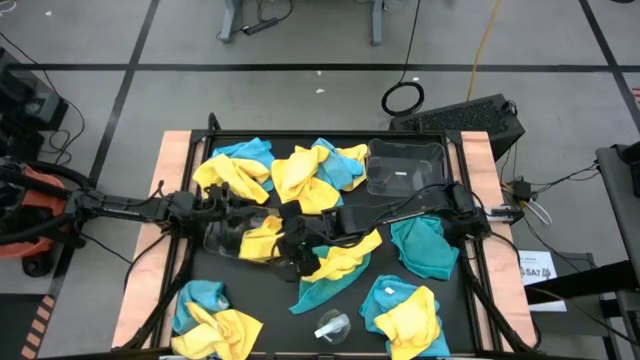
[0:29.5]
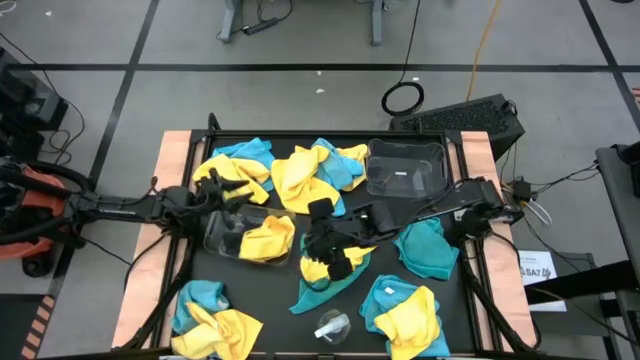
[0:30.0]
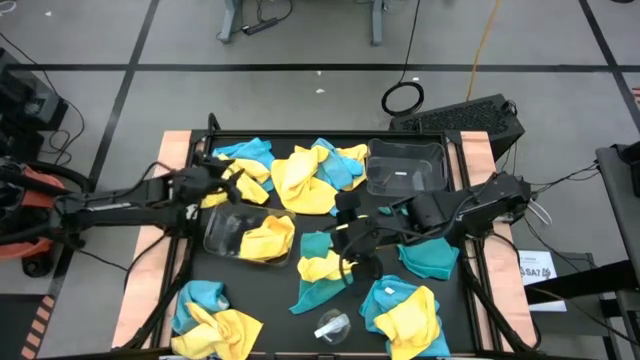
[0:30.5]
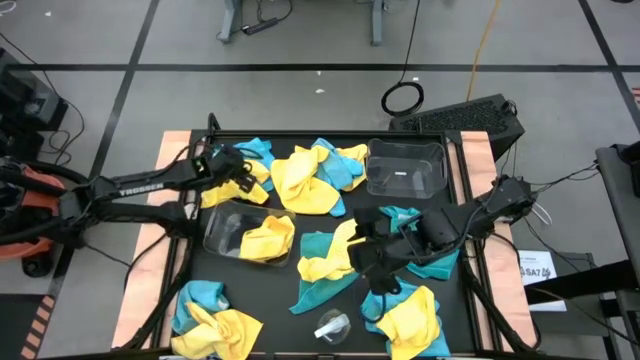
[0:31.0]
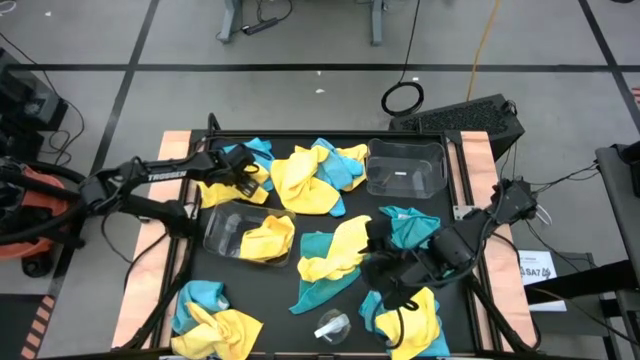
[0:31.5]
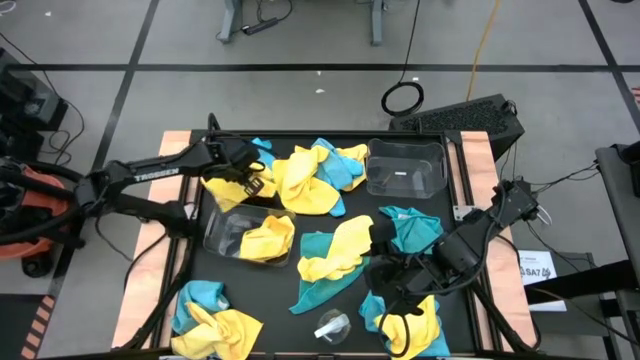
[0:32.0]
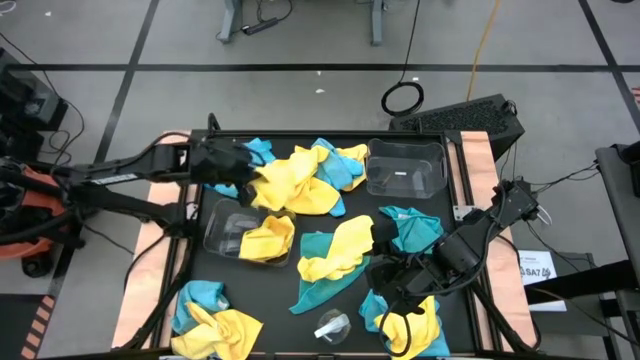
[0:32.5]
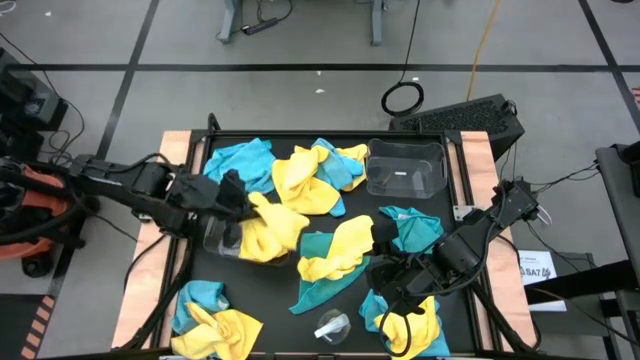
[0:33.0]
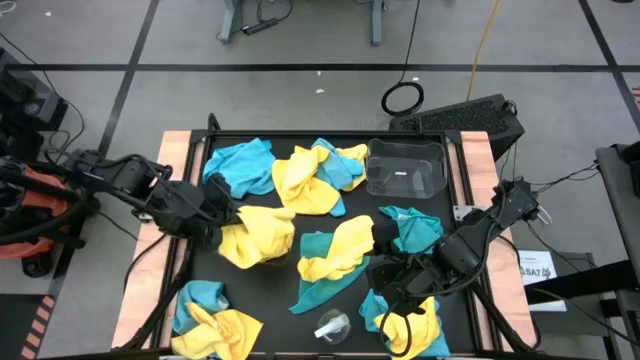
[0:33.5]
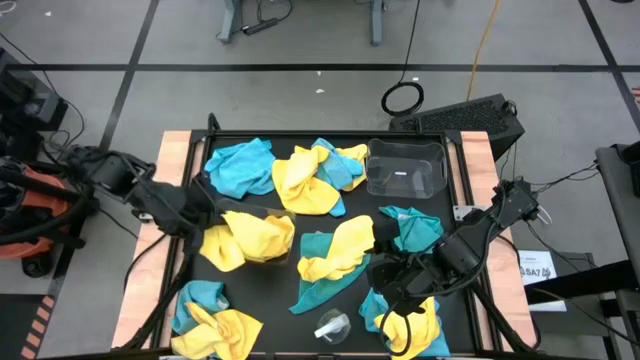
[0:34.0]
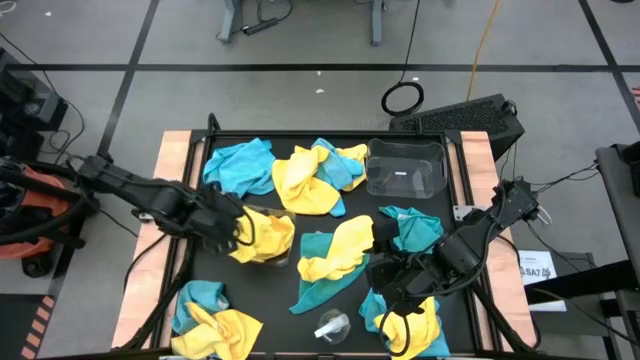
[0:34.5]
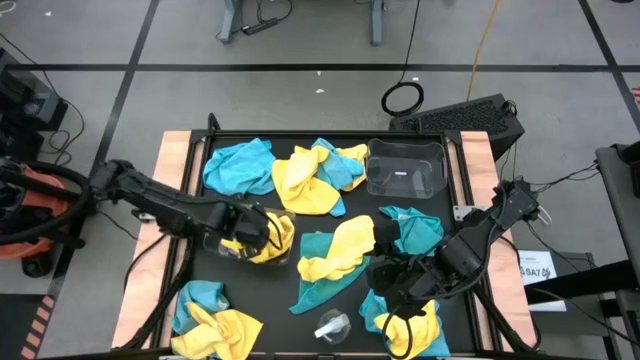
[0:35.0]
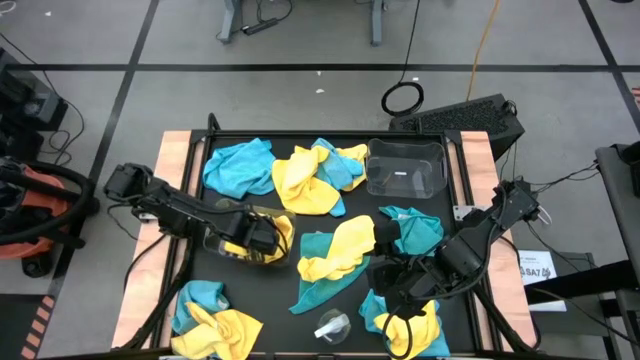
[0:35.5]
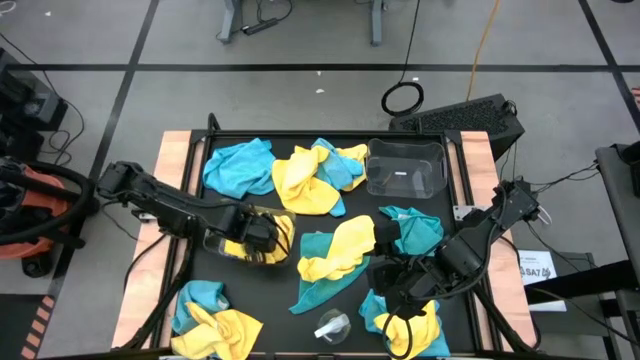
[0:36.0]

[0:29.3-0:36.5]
Task: Sort microfiber towel by color & place in baskets
Put the yellow microfiber towel into the bottom transparent bin

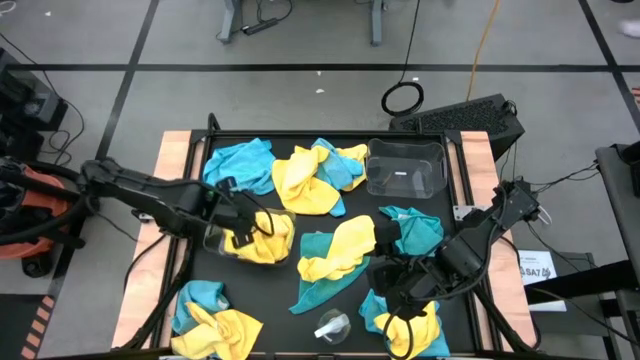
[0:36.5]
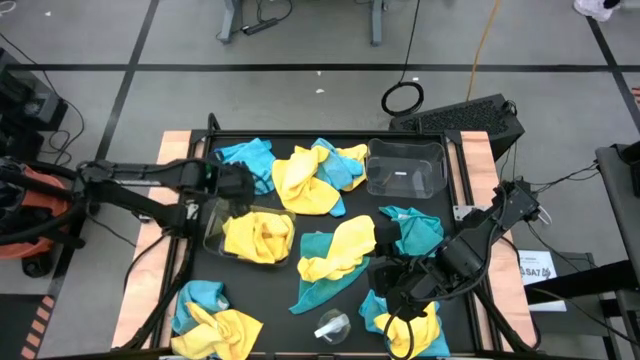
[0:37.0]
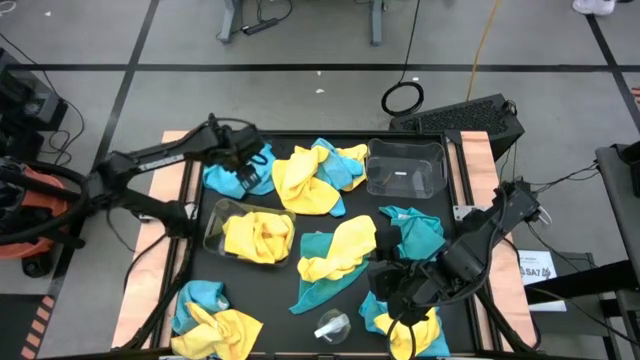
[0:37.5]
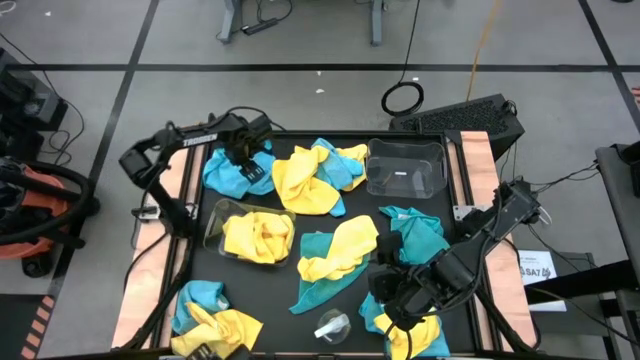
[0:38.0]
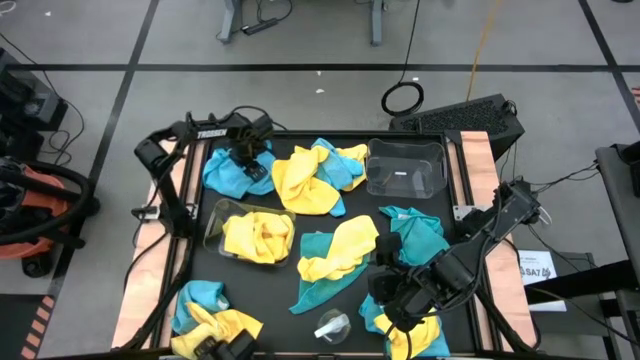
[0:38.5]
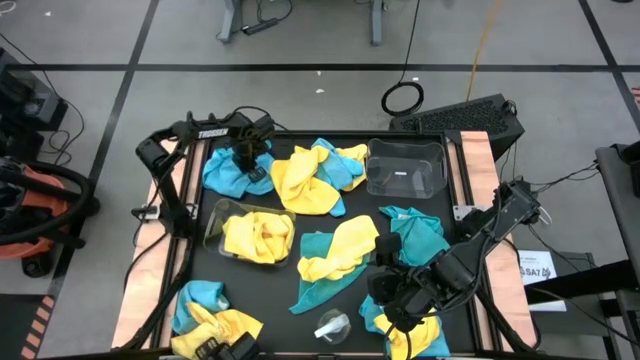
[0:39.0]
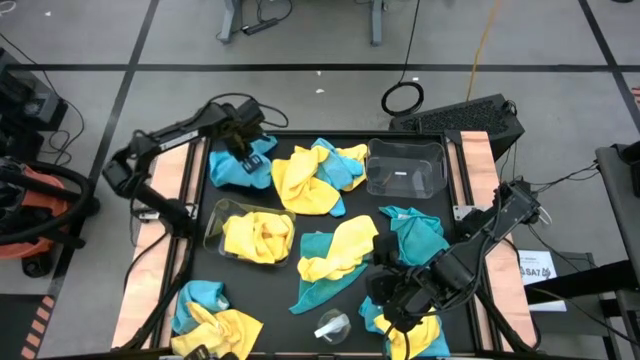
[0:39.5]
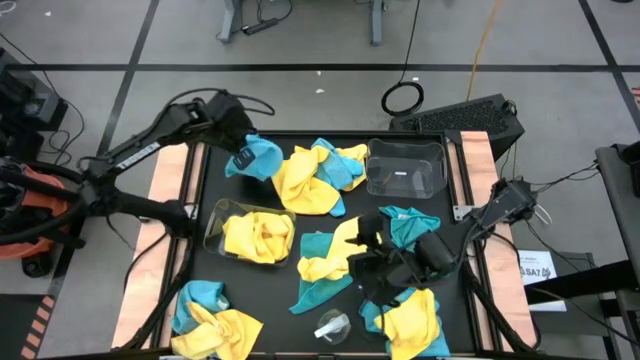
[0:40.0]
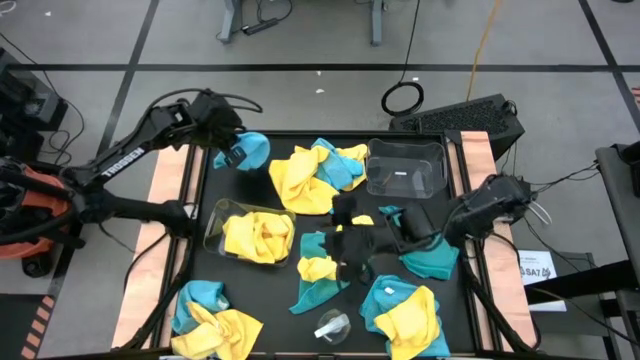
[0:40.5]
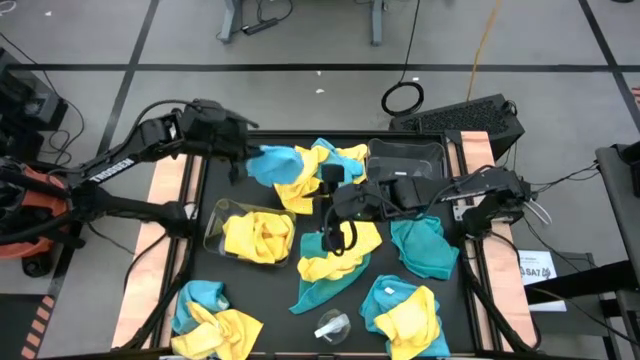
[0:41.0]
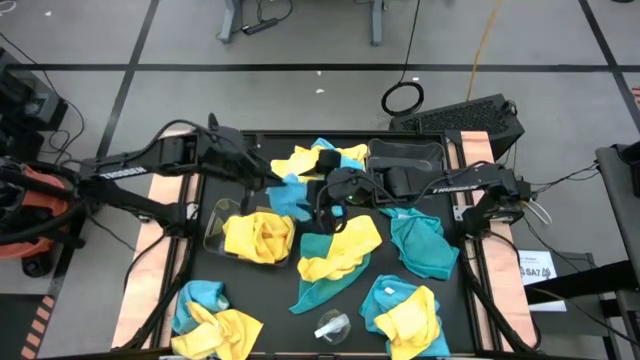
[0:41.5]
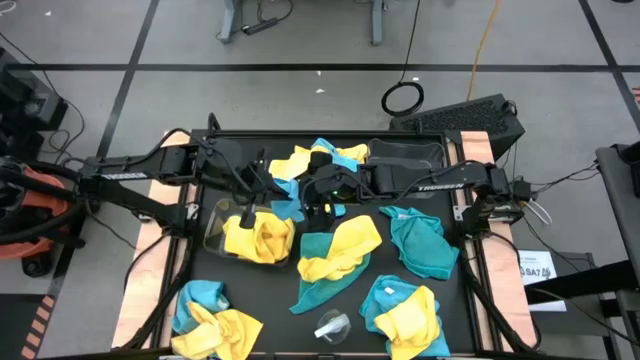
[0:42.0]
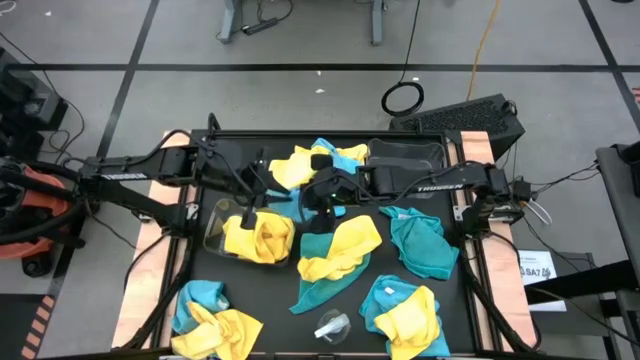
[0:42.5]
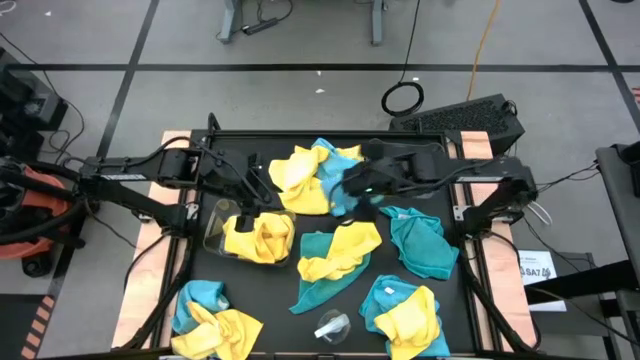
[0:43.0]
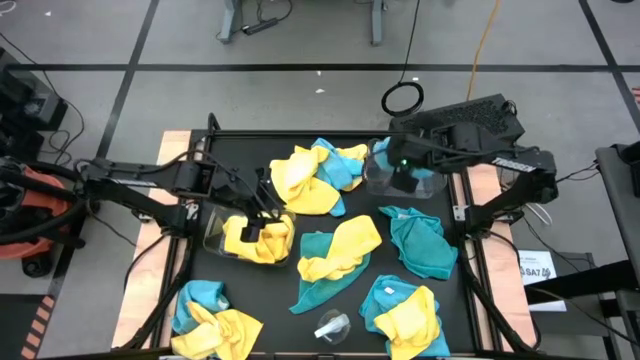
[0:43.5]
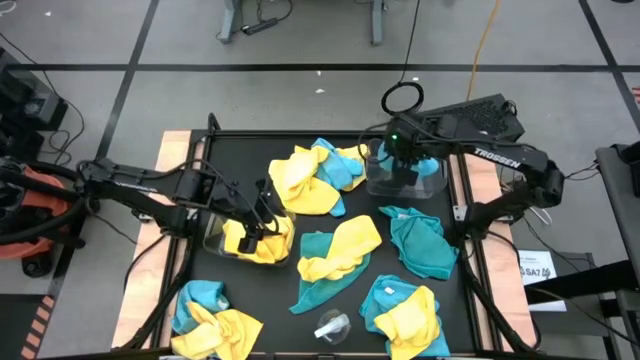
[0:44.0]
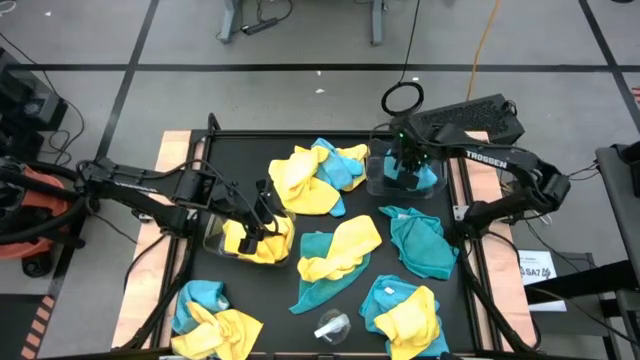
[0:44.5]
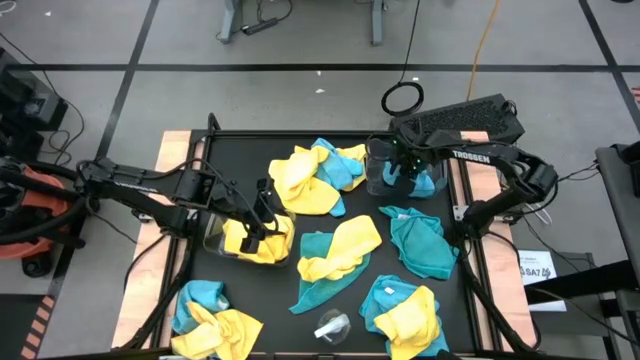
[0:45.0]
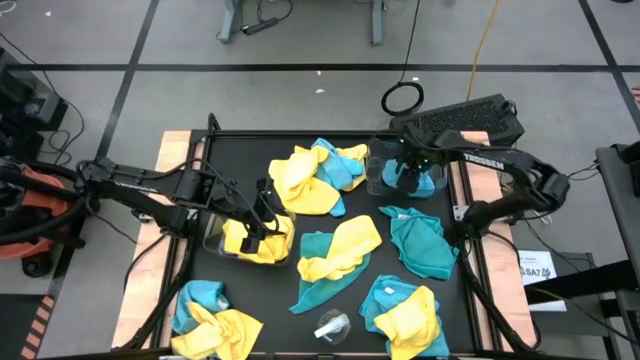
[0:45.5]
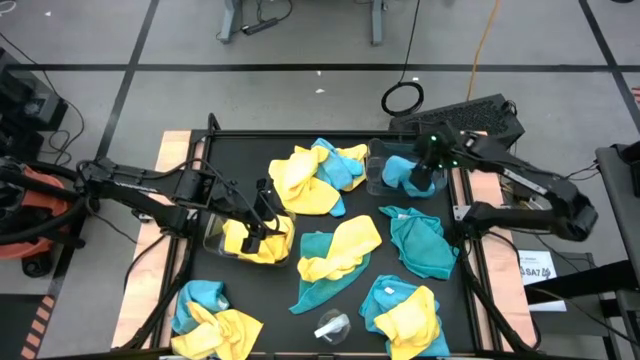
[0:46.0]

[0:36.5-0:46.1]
Put the blue microfiber towel into the top transparent bin
